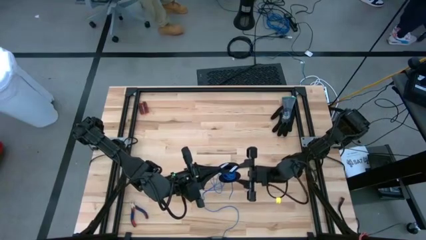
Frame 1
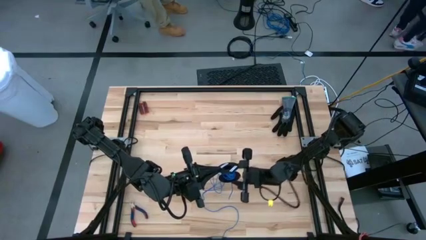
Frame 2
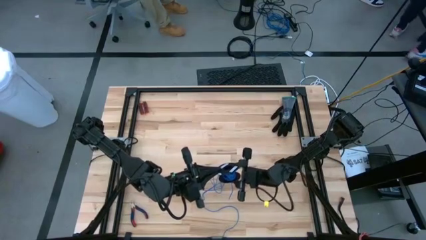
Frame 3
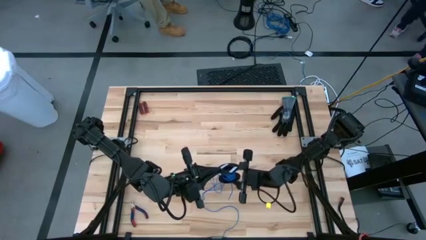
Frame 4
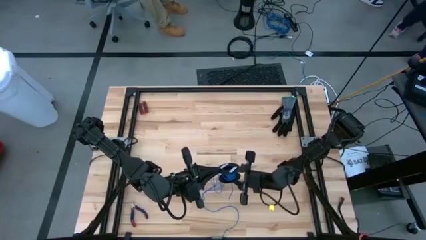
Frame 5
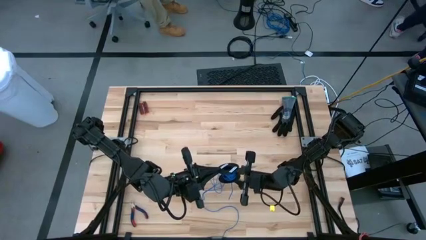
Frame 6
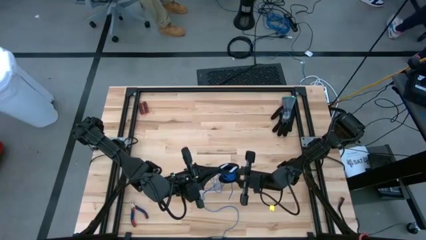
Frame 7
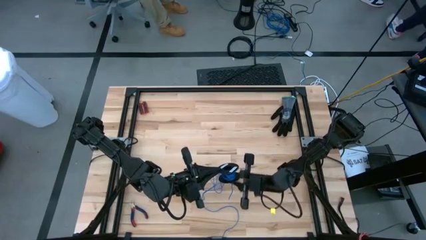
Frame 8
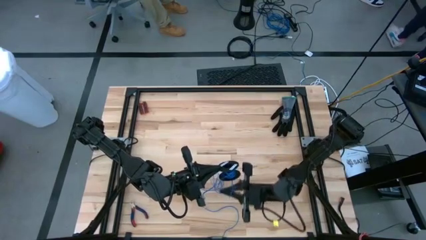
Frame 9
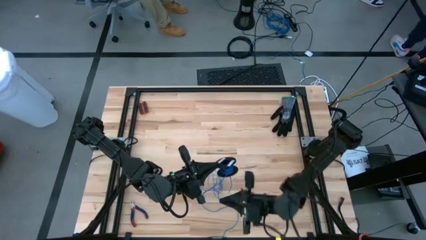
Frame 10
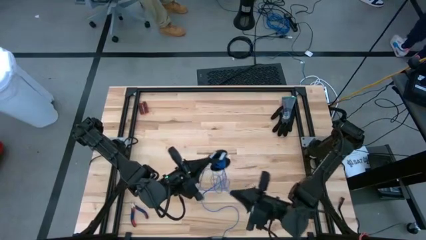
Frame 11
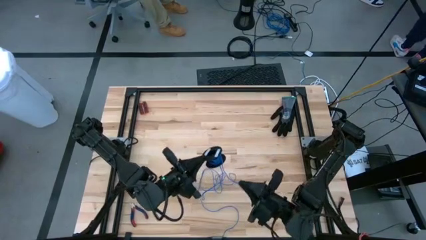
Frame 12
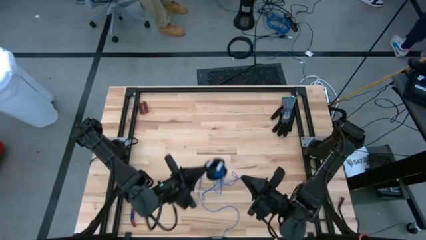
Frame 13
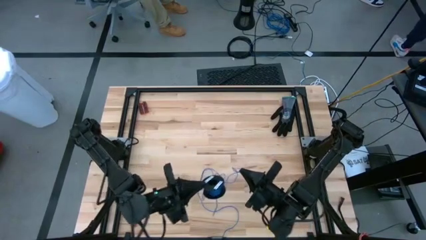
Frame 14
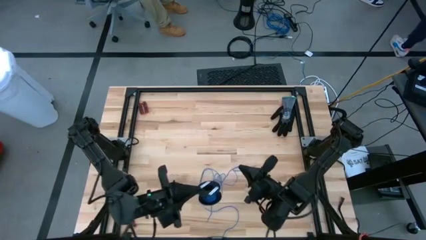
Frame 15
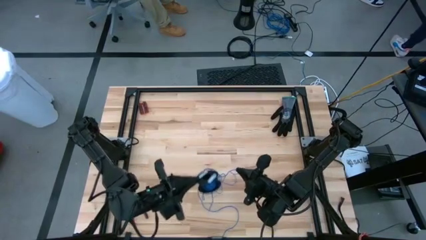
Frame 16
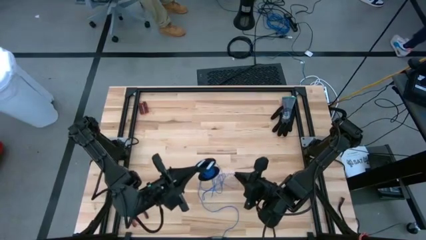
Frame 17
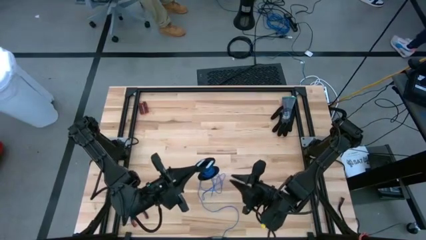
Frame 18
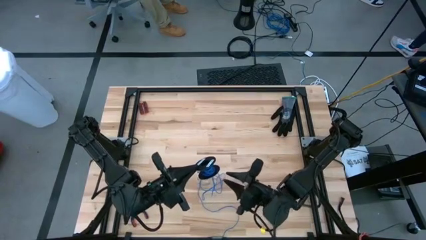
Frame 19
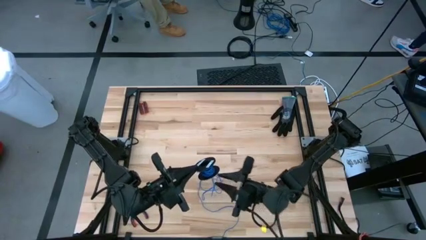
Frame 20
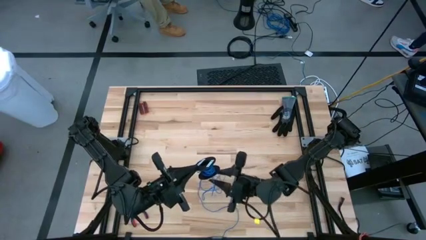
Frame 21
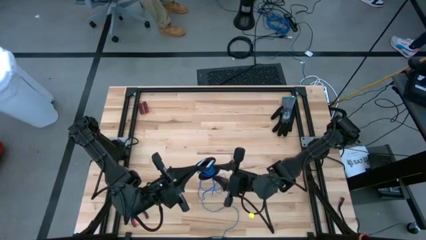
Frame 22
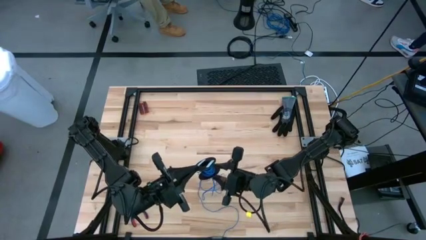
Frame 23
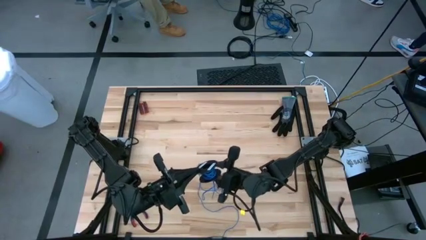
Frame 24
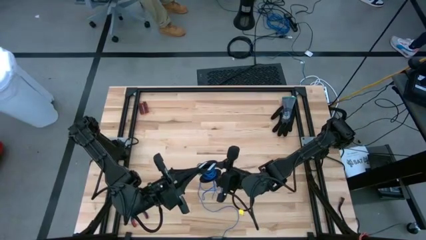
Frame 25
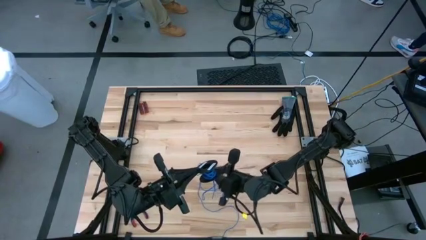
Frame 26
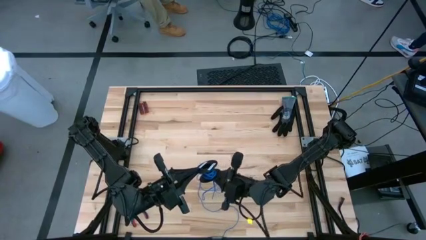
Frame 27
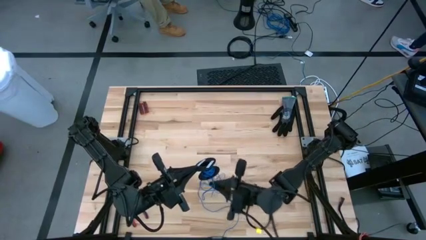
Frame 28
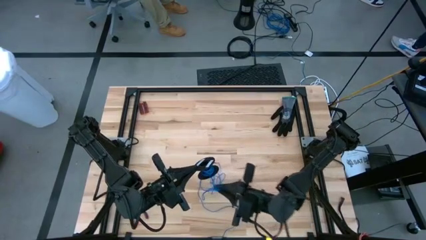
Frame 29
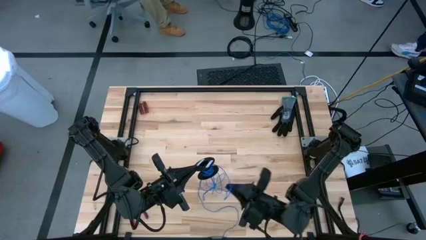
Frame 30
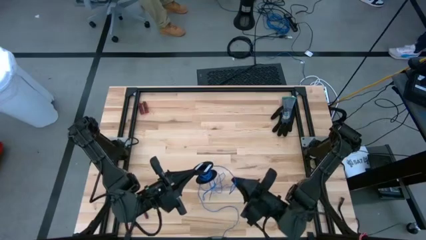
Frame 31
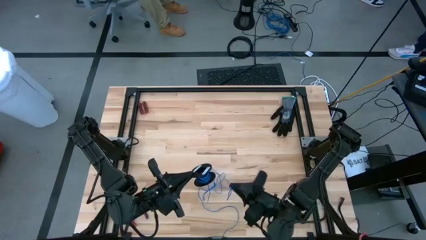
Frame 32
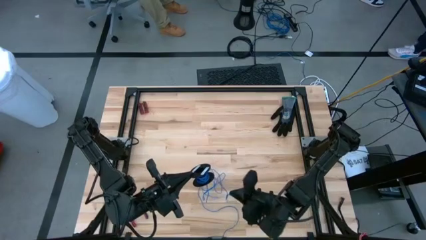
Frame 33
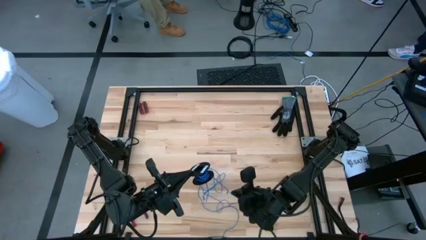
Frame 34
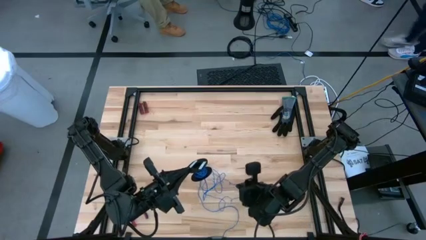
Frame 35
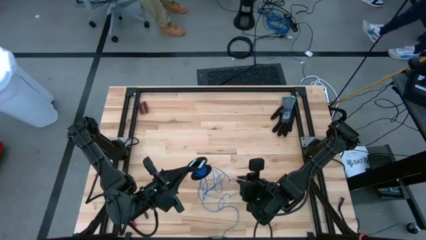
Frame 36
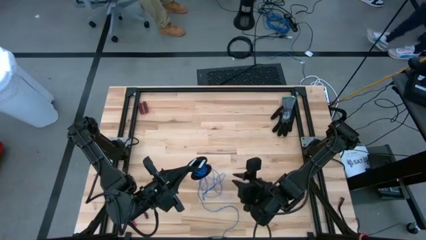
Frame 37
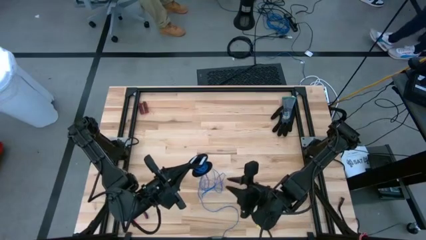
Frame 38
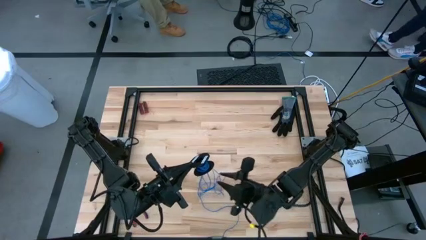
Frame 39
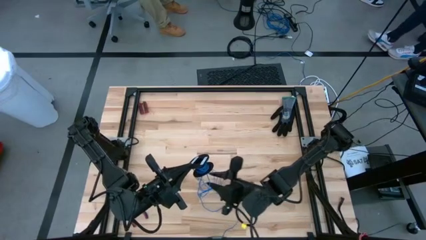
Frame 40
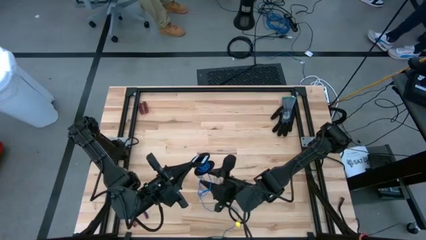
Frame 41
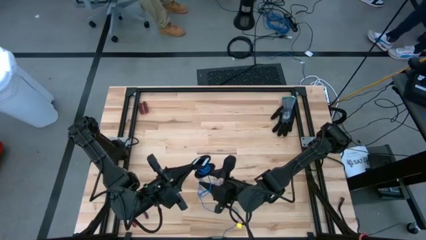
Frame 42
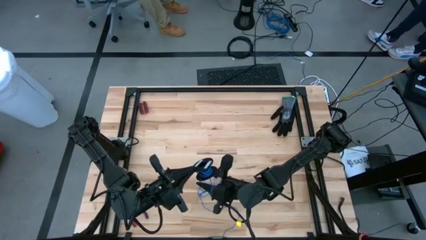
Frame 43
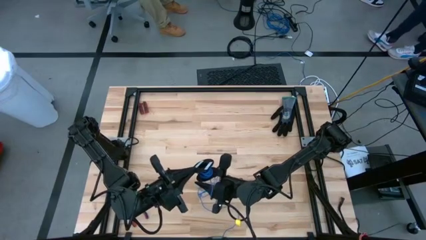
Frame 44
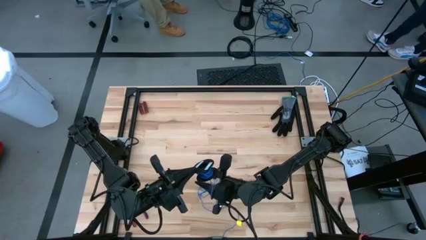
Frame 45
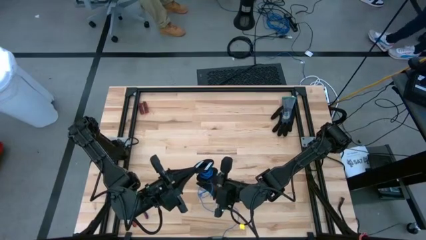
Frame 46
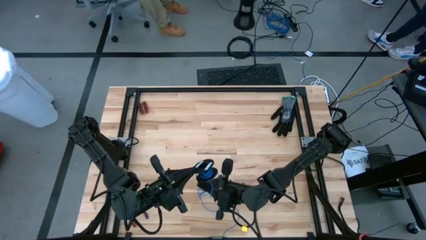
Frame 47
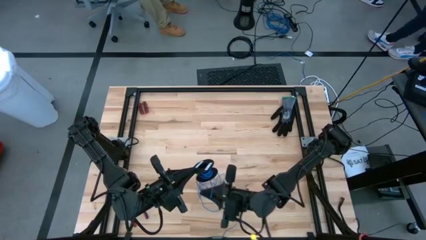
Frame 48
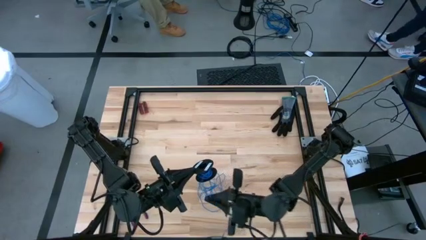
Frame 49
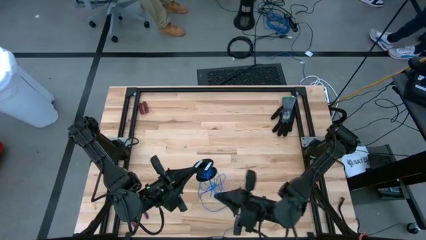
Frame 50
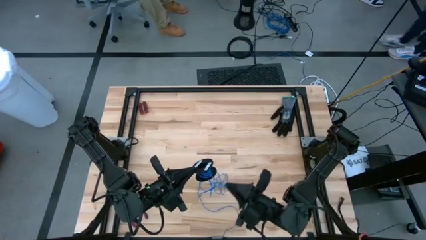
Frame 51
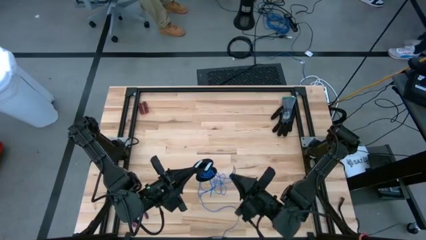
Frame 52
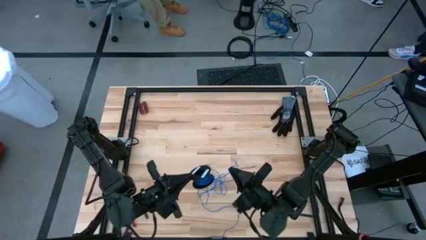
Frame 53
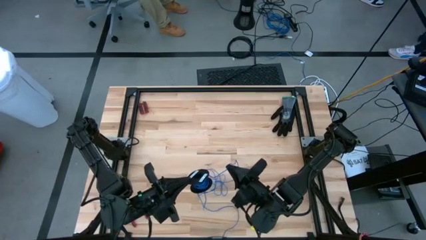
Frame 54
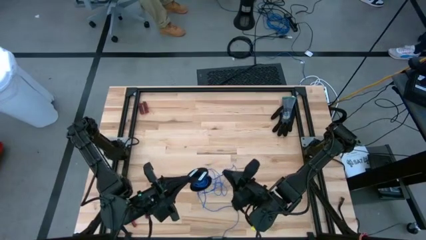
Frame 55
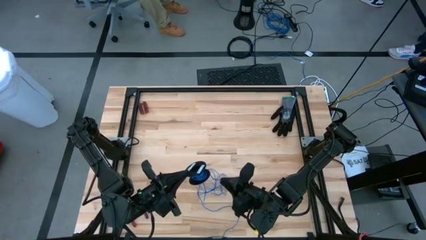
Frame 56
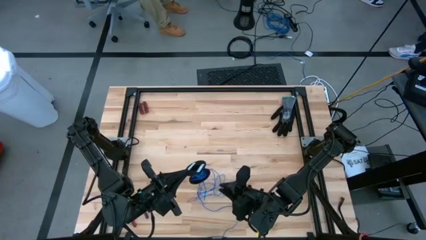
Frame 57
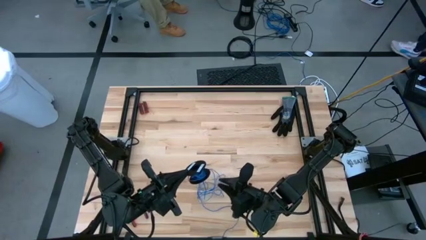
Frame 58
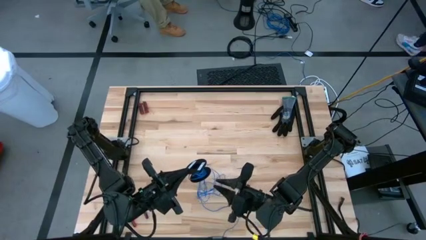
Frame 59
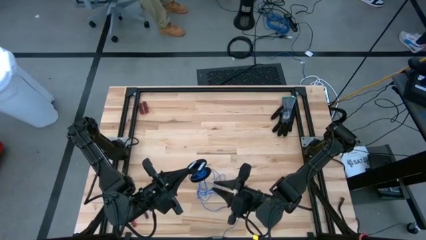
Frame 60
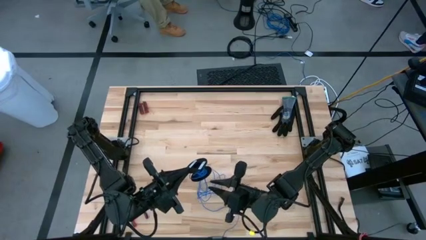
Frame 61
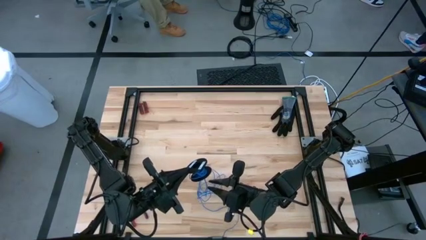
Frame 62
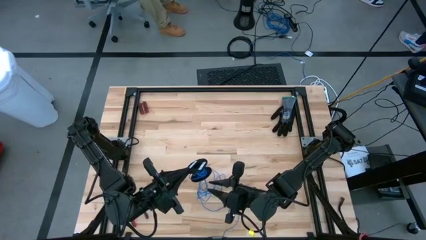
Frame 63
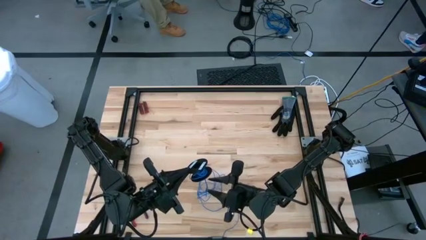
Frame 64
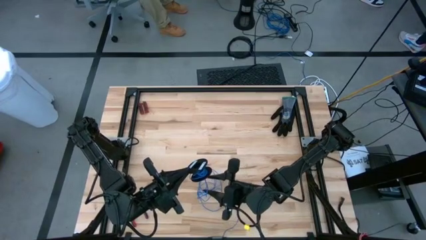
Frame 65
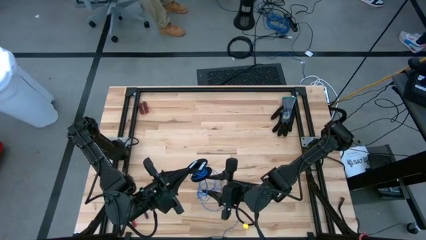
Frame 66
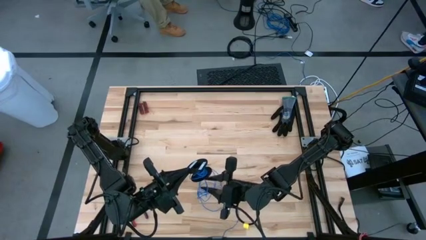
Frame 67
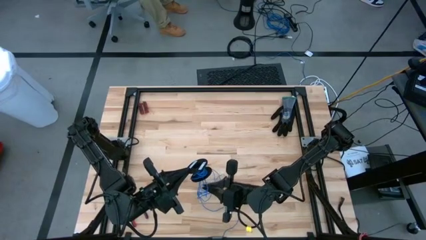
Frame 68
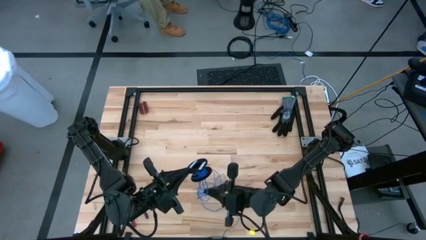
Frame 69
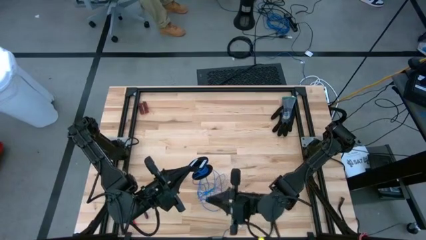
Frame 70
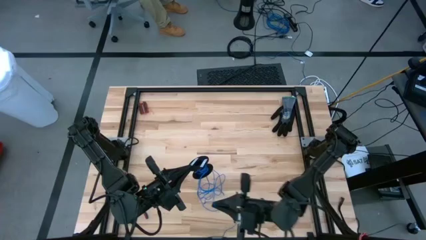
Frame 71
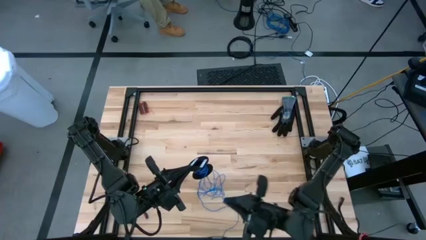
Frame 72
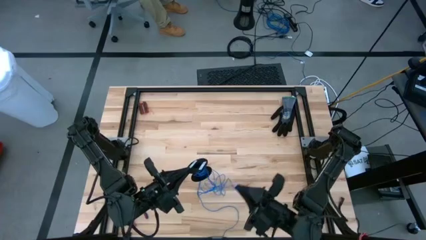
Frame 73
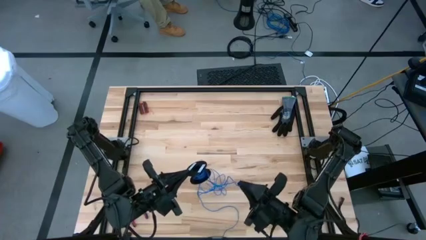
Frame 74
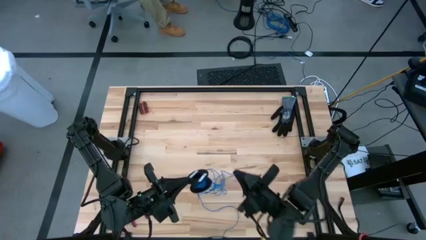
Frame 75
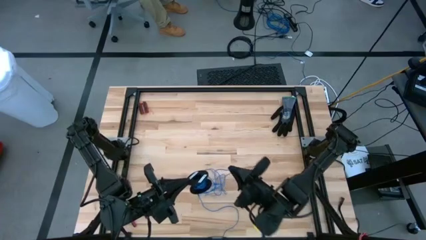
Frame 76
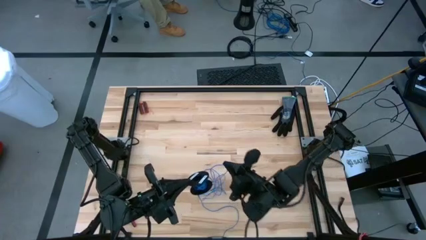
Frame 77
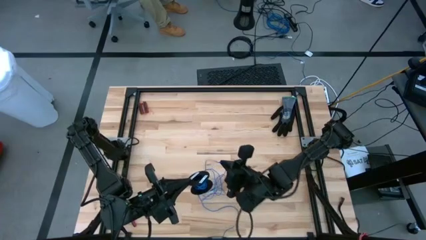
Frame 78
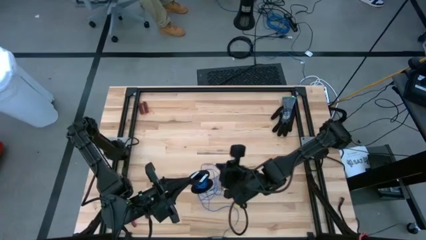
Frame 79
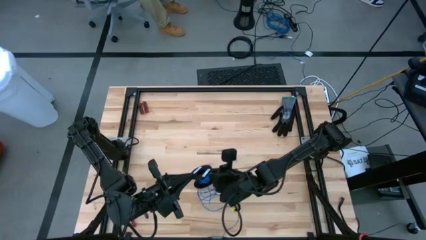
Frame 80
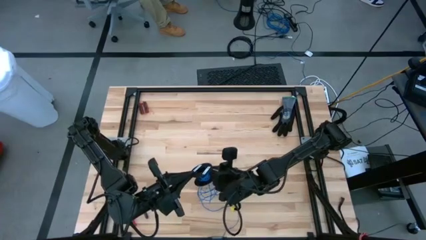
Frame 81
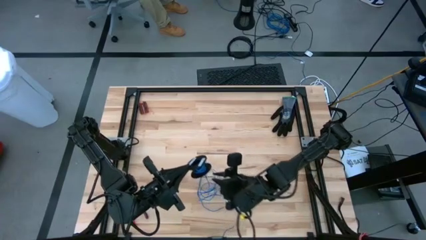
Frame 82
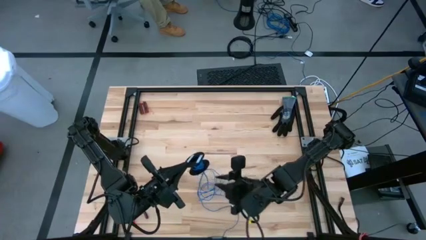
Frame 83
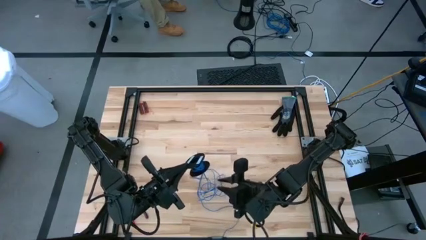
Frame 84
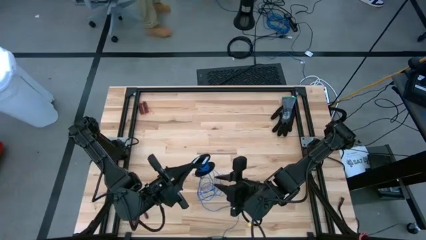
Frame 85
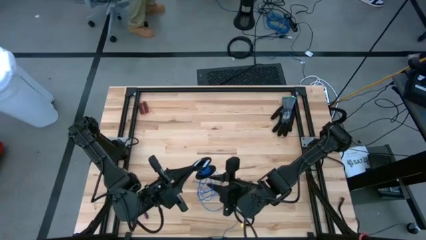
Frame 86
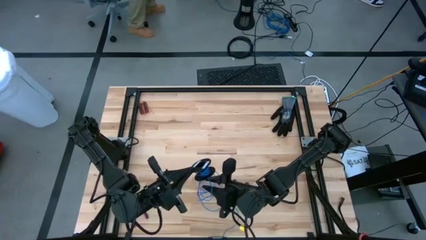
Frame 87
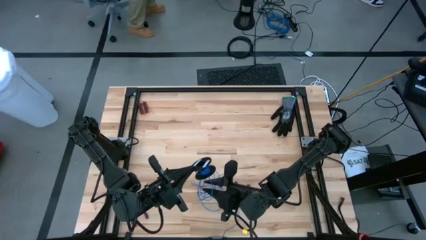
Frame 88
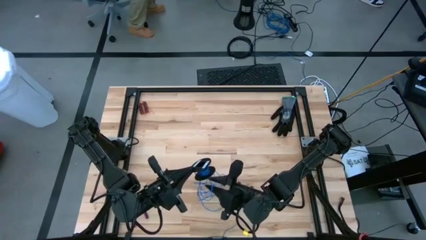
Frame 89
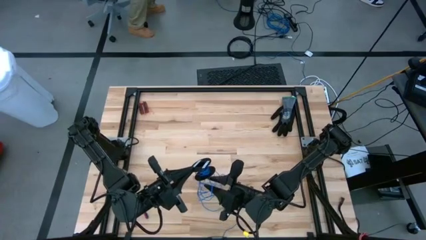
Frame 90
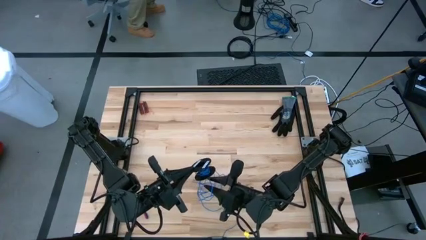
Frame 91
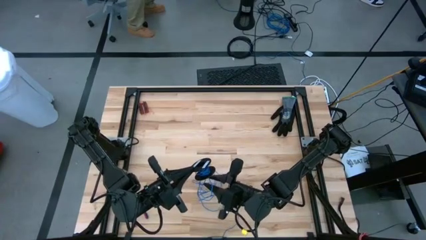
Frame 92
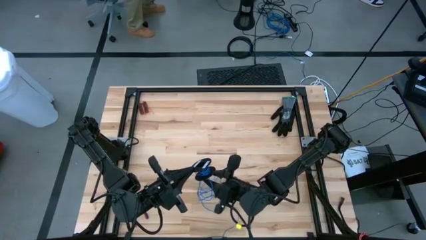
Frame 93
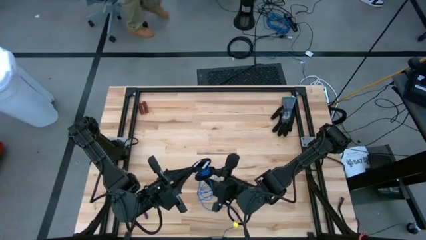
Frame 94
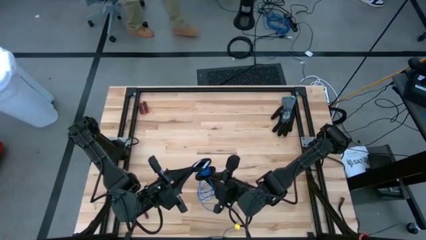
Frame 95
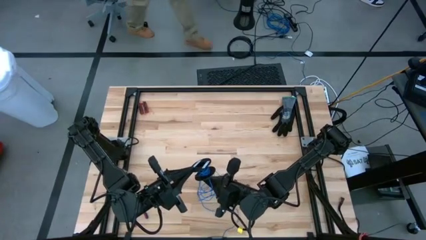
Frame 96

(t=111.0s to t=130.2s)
Task: Coil cords
Uncoil the blue wire from the spool
